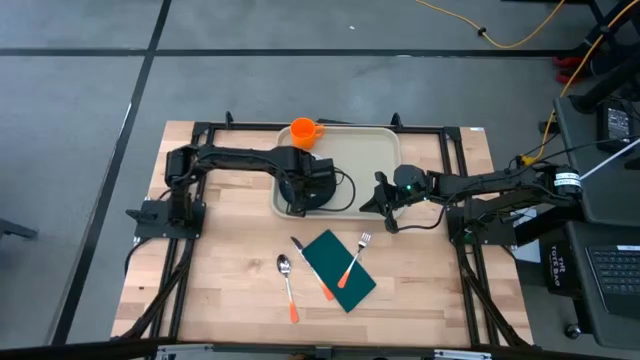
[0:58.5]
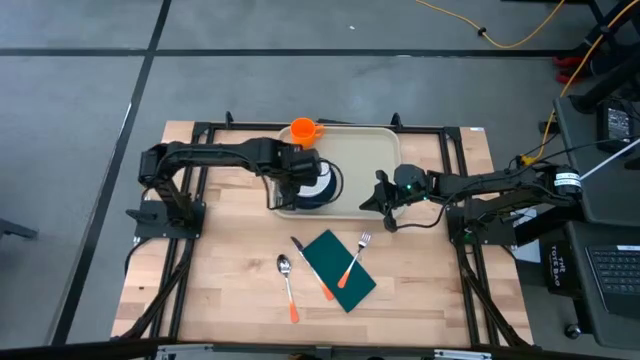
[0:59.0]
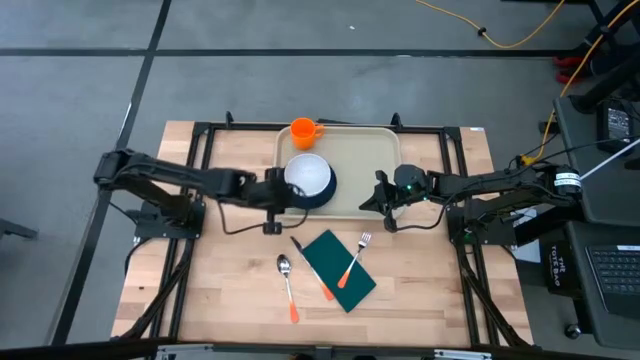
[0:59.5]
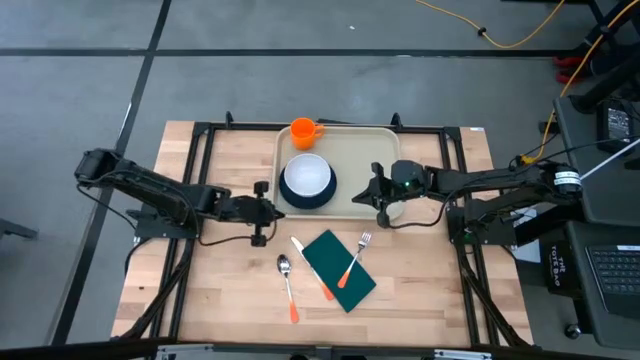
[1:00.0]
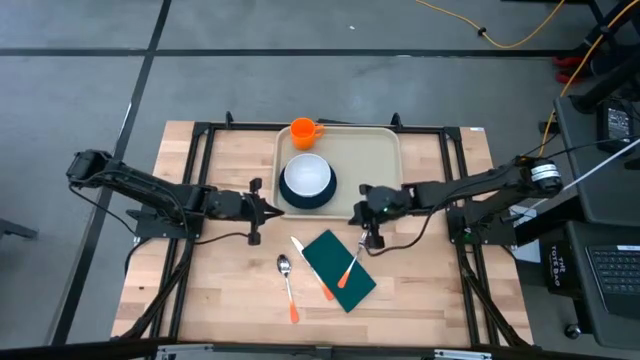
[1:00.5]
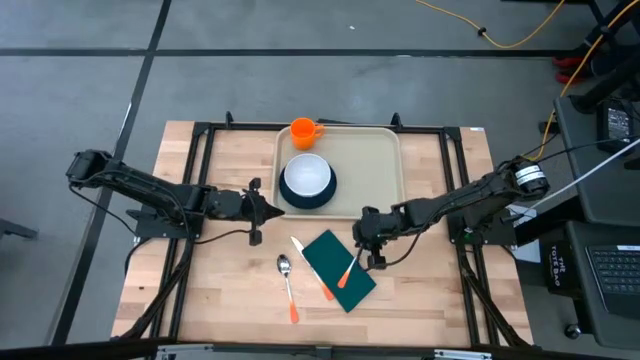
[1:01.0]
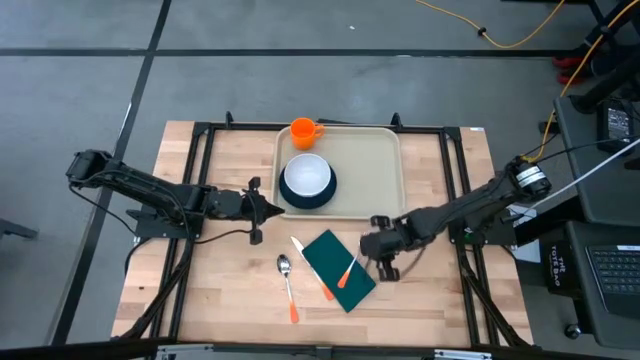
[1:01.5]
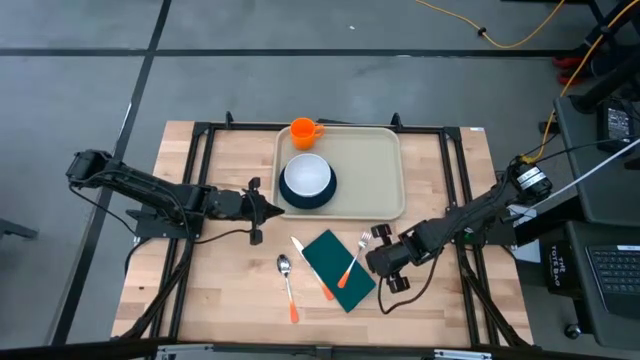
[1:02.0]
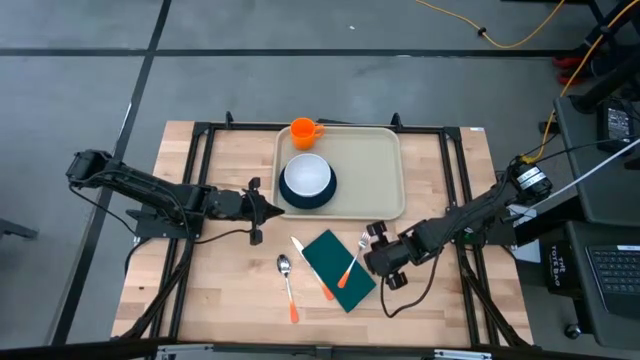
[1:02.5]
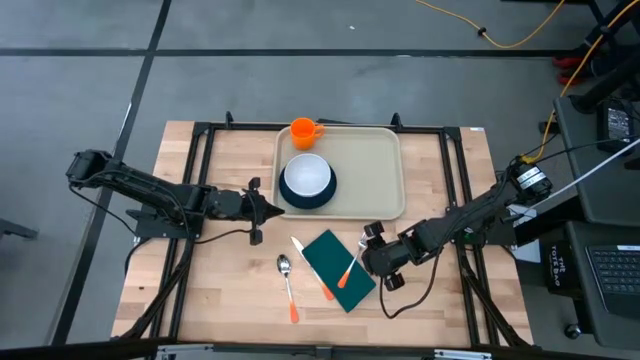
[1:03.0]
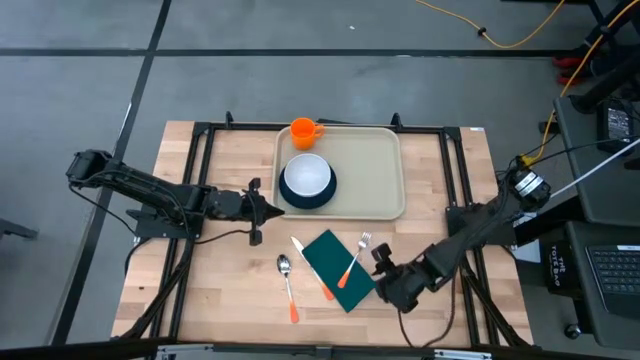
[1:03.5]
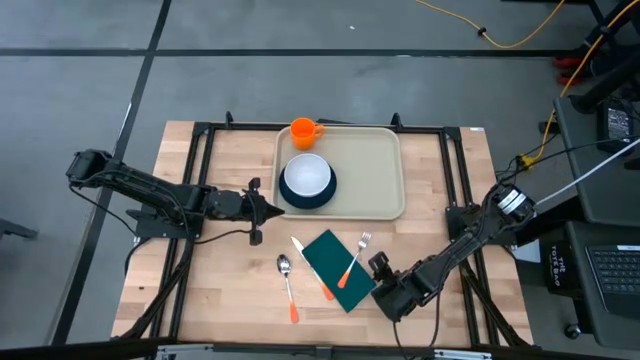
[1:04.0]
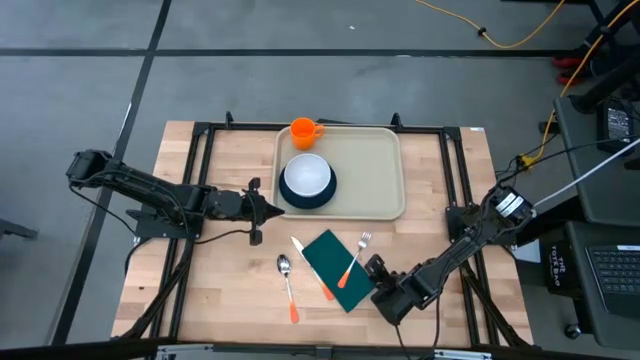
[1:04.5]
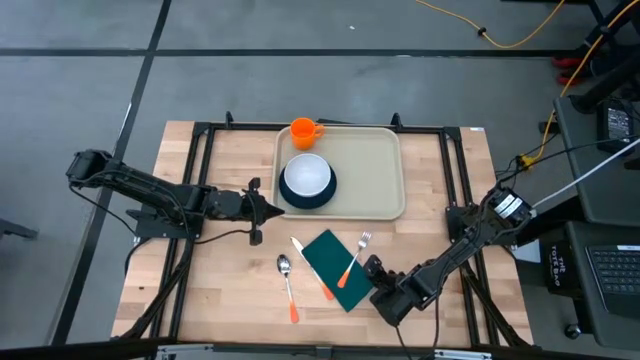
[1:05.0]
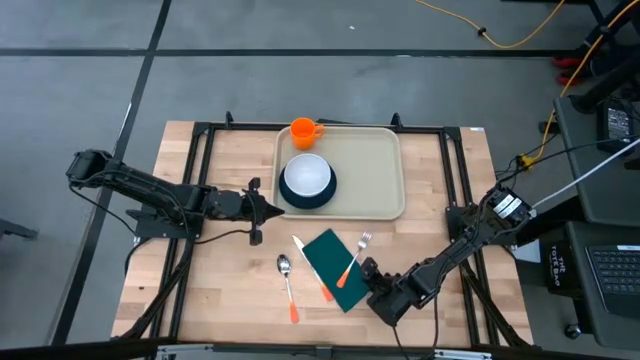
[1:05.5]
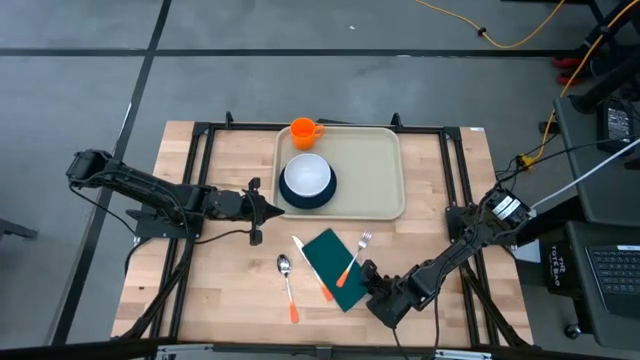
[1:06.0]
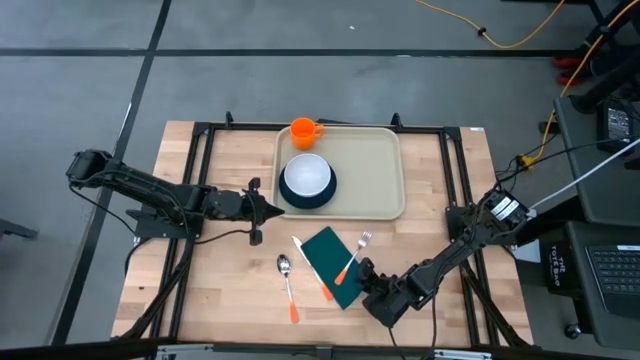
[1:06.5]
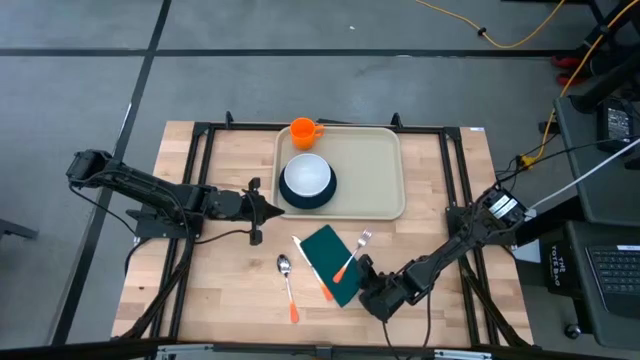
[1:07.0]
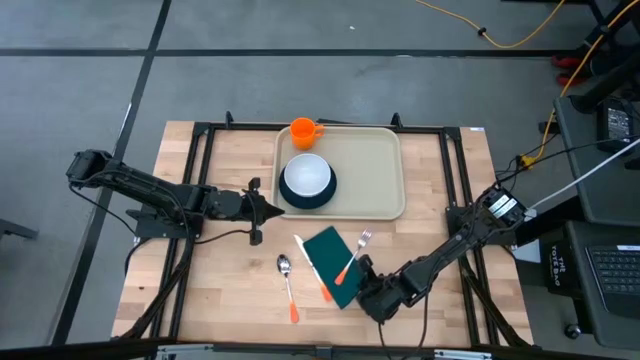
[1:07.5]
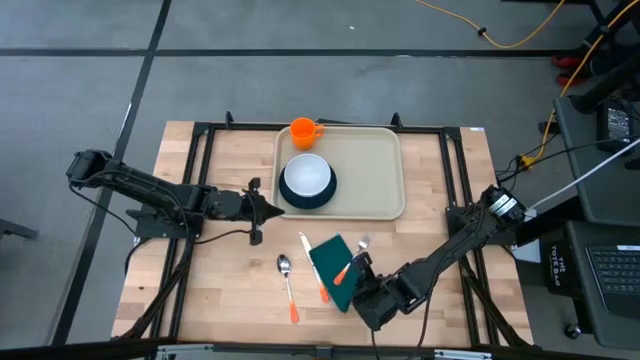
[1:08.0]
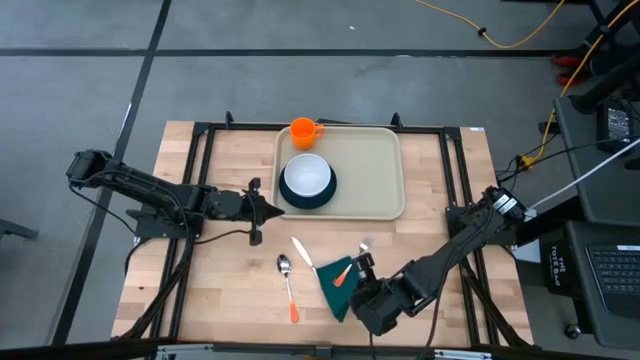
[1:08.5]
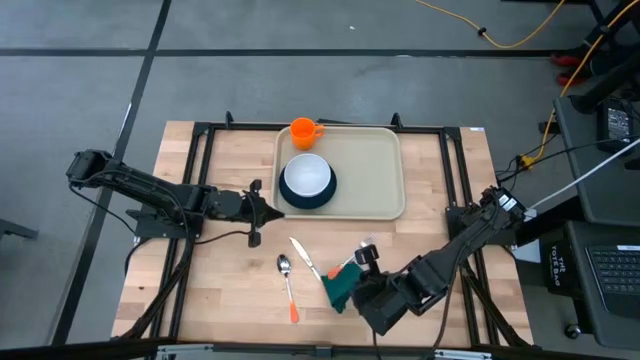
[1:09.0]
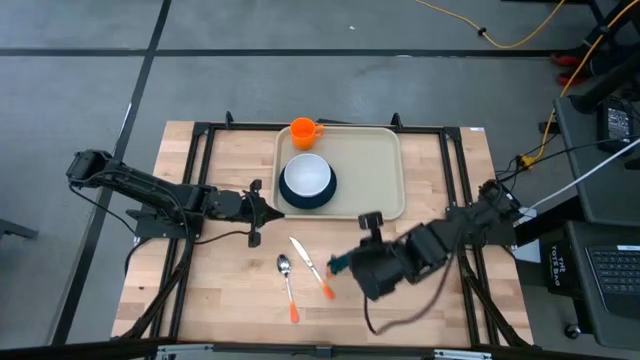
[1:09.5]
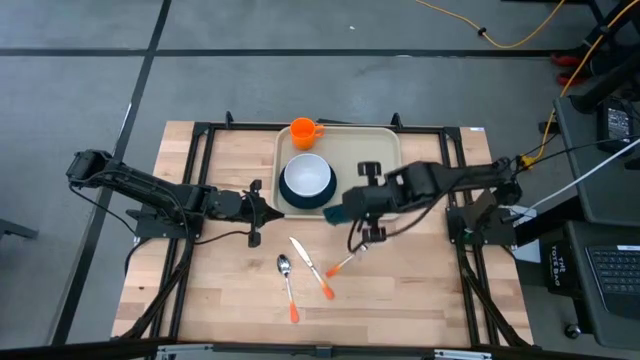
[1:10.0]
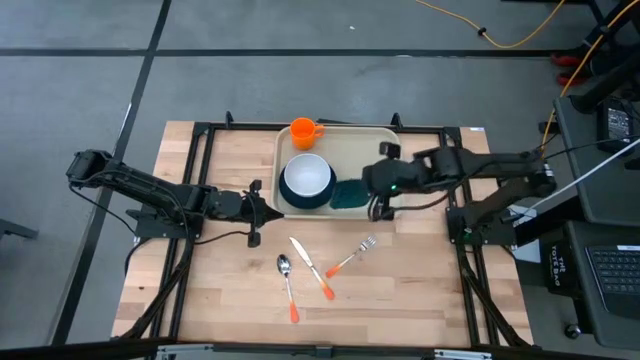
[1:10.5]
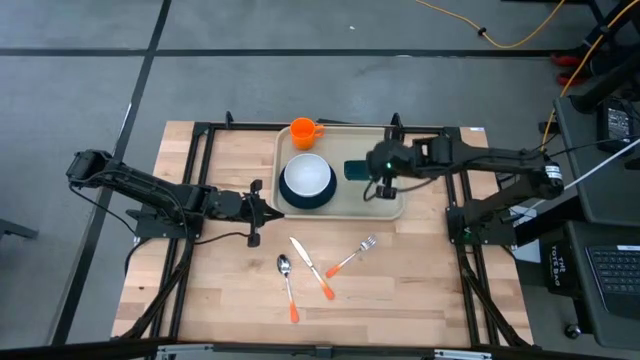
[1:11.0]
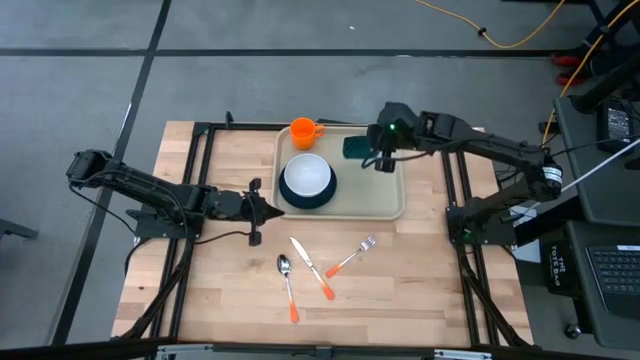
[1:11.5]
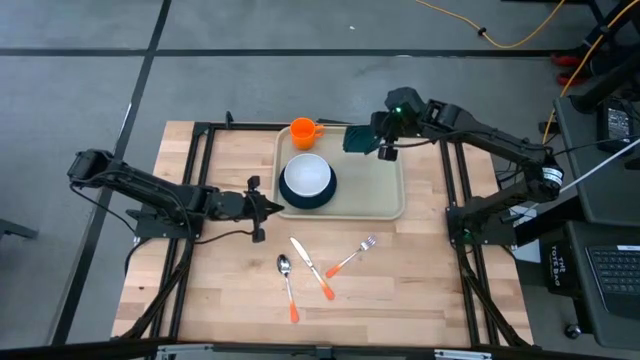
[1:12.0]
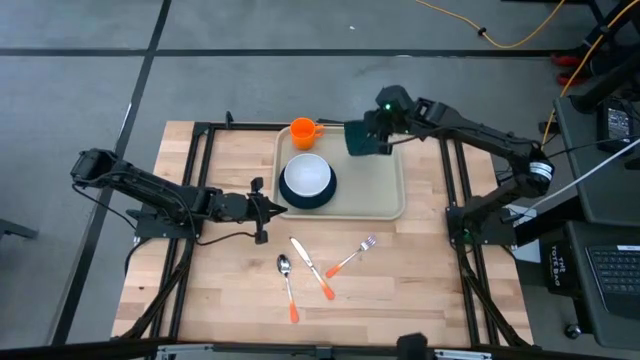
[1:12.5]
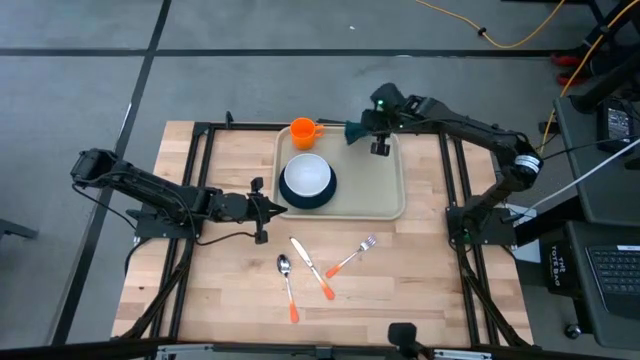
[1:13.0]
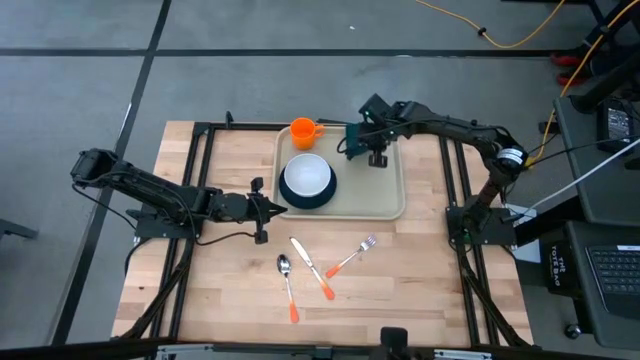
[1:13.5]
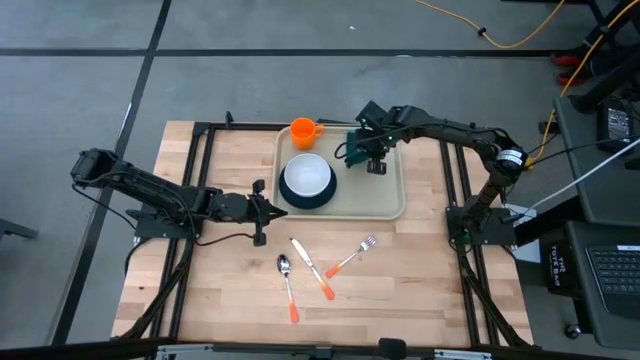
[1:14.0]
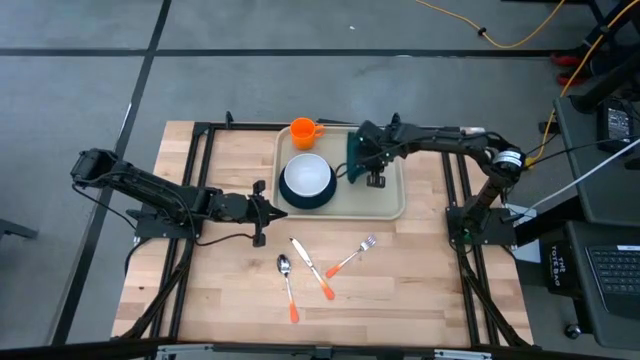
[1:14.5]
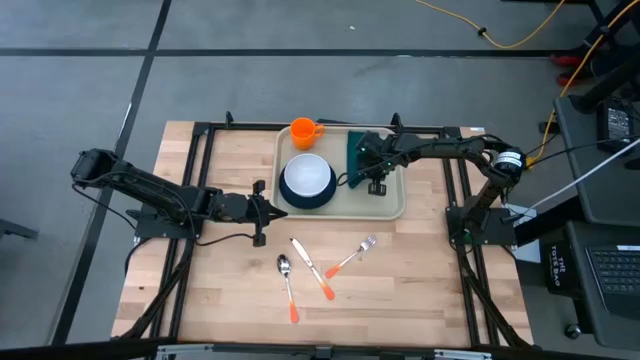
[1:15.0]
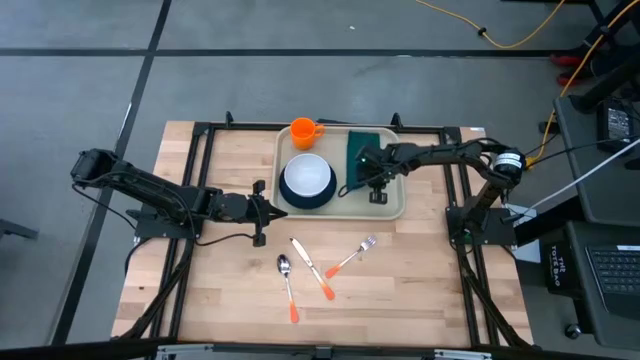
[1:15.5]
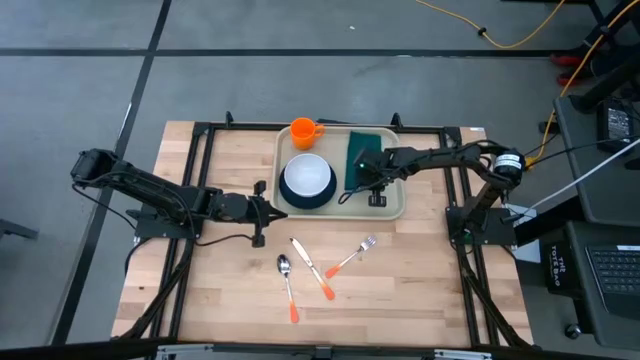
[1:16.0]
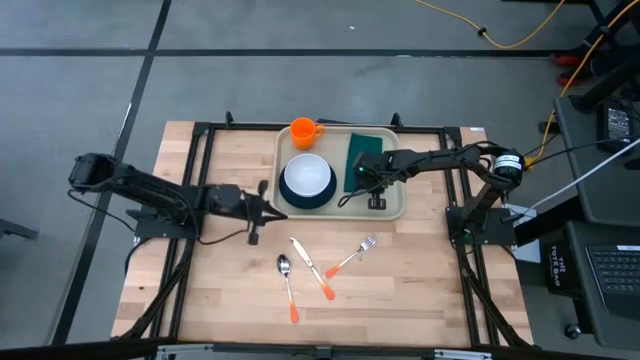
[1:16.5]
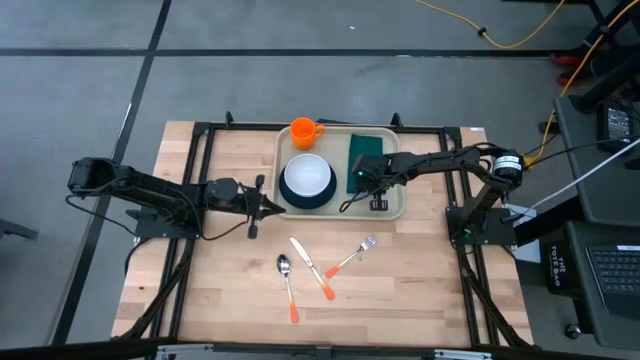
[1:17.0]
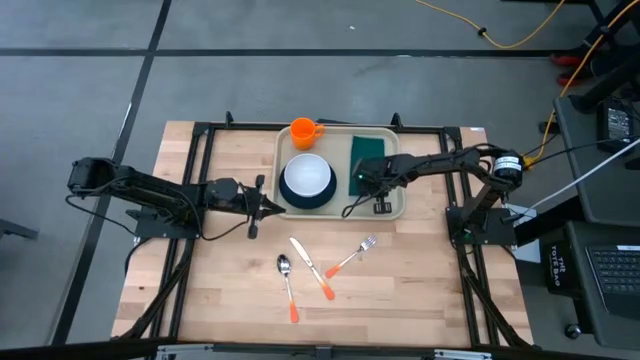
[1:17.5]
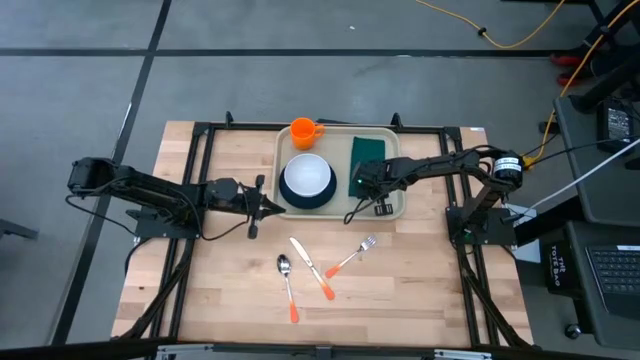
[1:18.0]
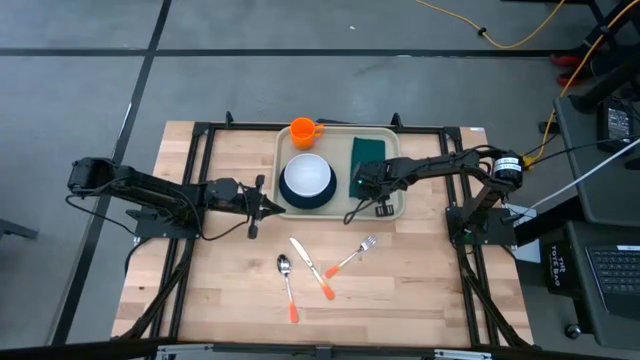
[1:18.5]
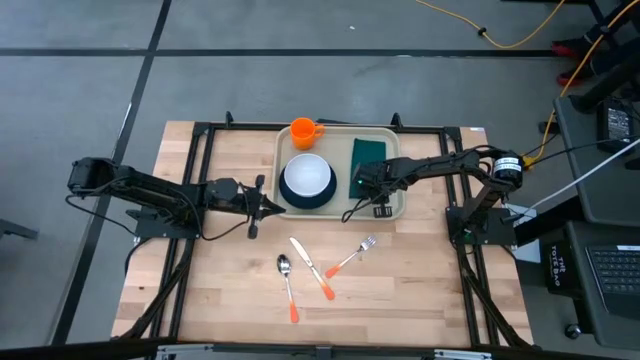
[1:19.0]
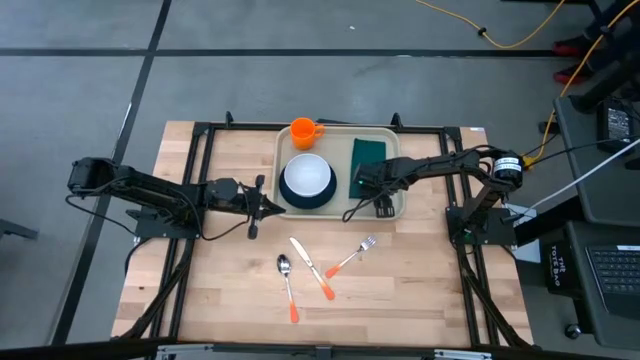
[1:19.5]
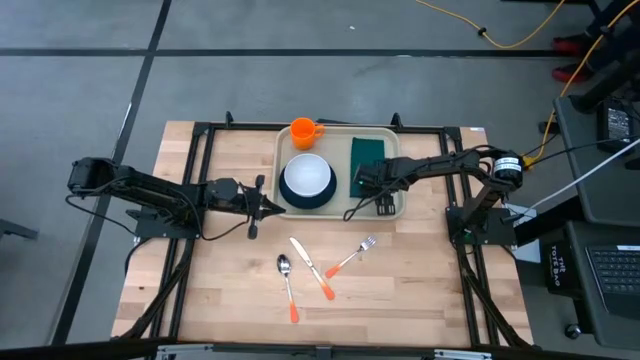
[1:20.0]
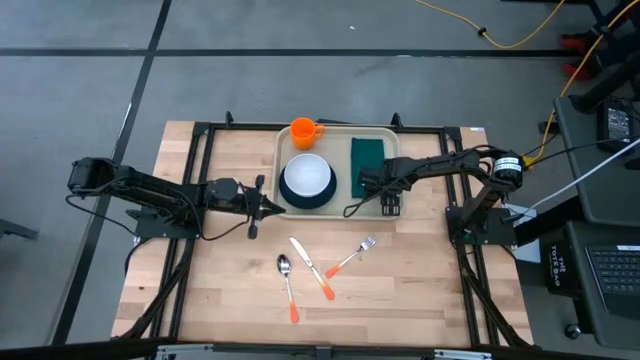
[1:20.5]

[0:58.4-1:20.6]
Task: Set up tray
Put the dark green napkin on the gray tray
